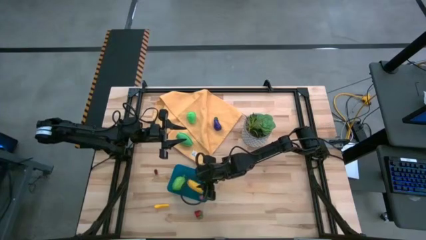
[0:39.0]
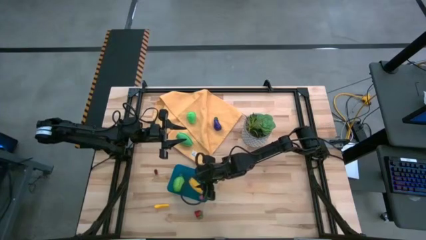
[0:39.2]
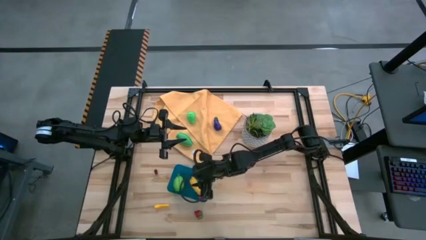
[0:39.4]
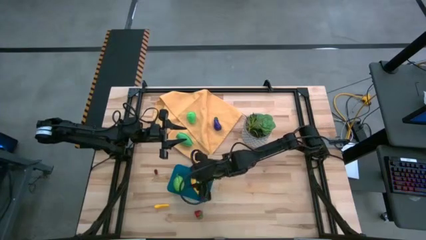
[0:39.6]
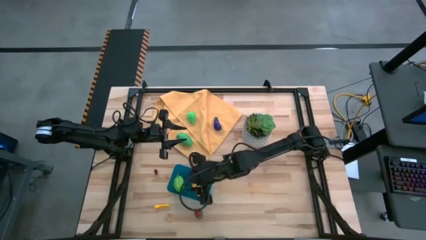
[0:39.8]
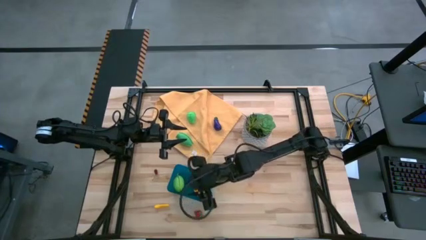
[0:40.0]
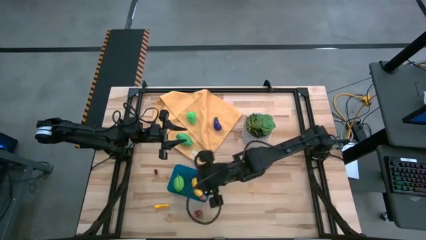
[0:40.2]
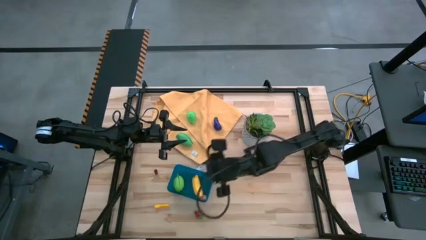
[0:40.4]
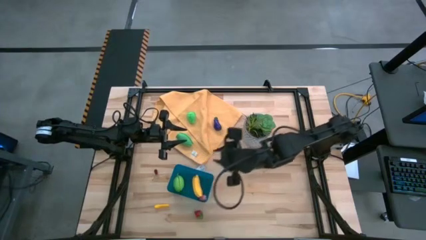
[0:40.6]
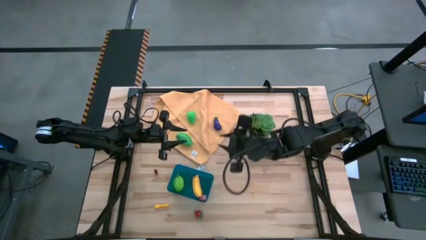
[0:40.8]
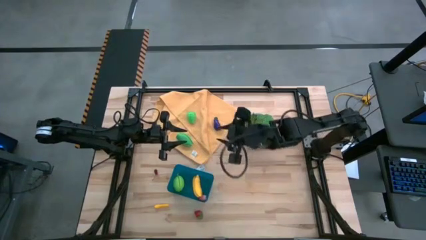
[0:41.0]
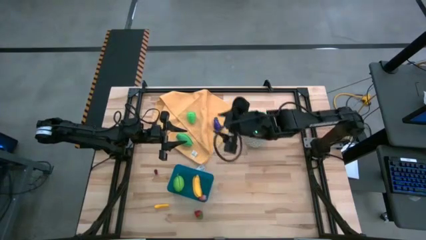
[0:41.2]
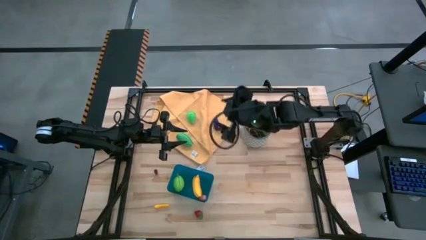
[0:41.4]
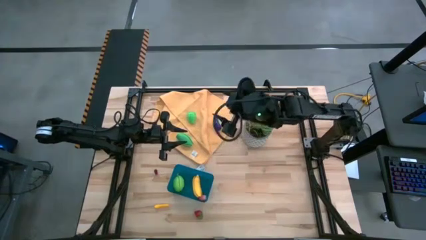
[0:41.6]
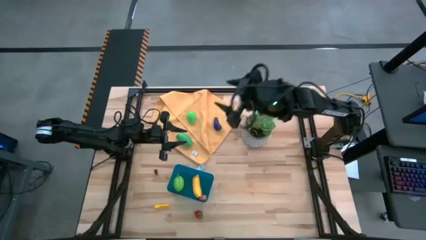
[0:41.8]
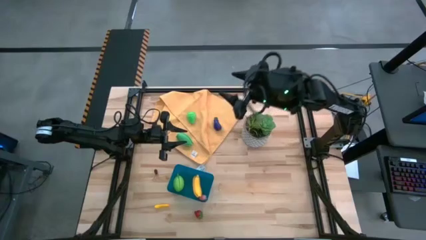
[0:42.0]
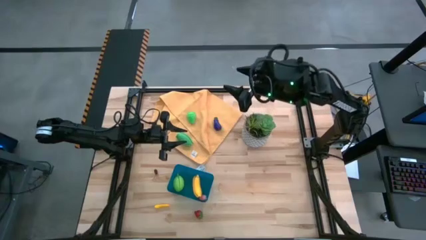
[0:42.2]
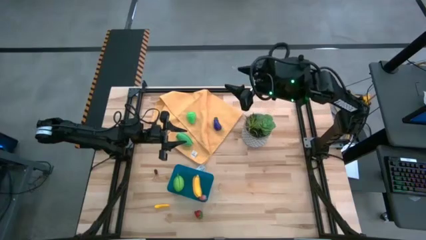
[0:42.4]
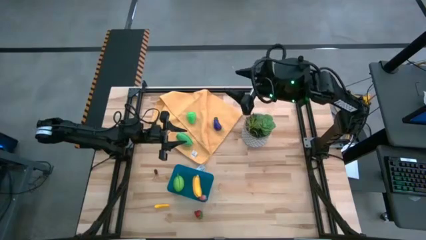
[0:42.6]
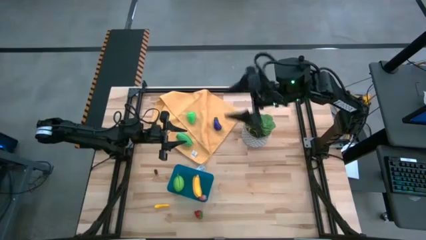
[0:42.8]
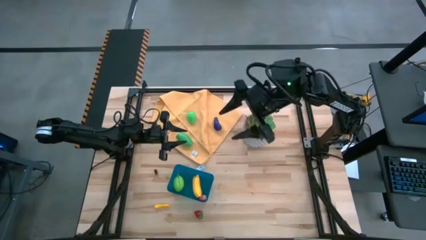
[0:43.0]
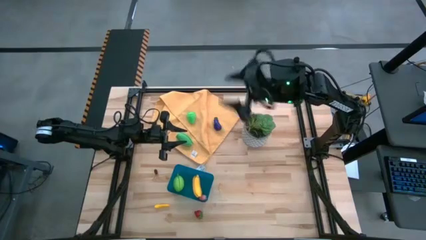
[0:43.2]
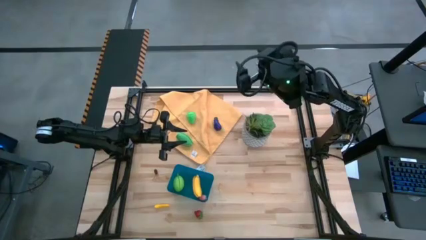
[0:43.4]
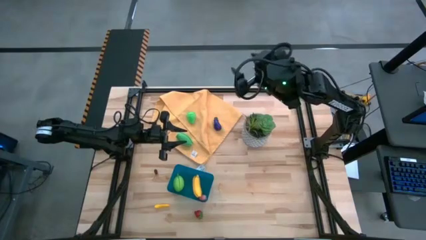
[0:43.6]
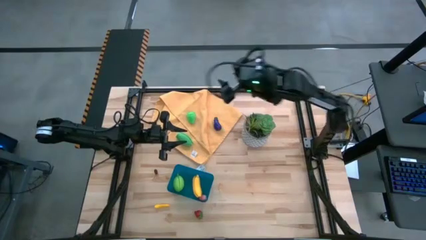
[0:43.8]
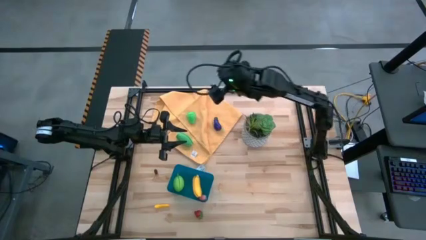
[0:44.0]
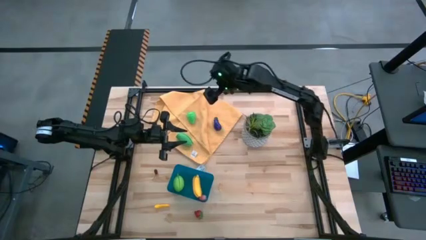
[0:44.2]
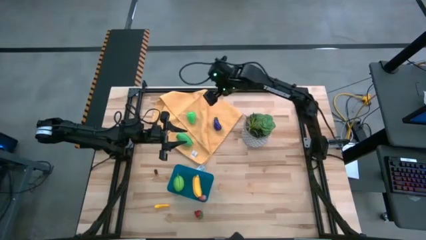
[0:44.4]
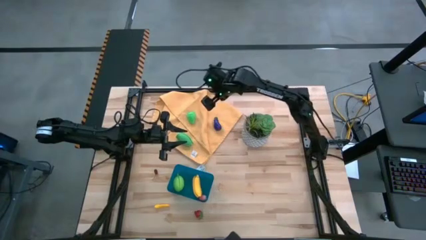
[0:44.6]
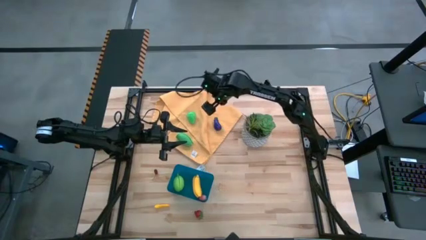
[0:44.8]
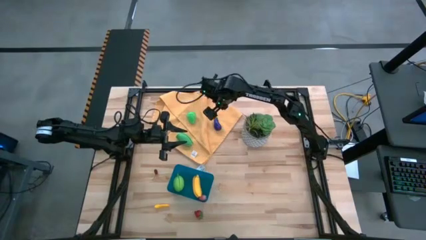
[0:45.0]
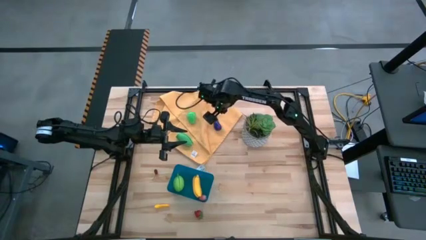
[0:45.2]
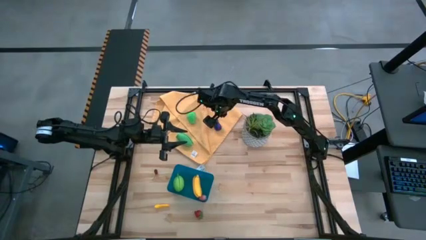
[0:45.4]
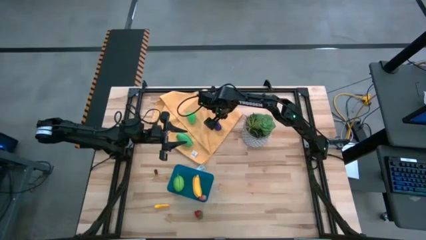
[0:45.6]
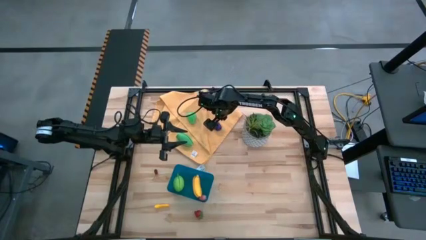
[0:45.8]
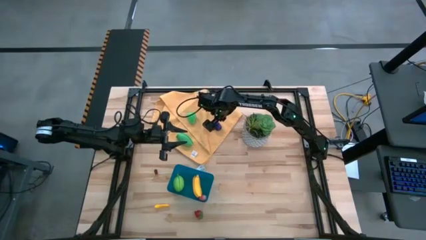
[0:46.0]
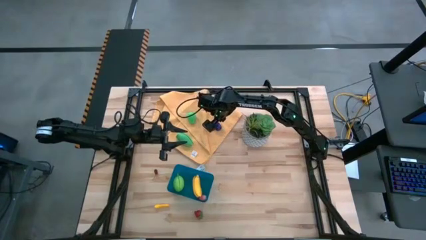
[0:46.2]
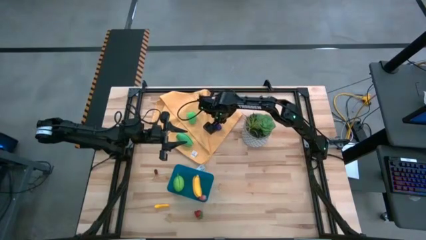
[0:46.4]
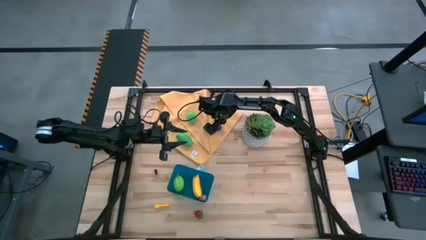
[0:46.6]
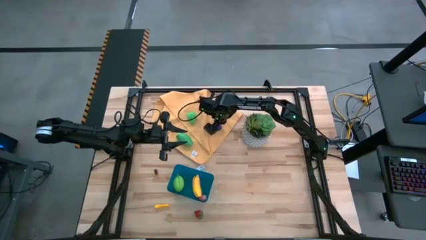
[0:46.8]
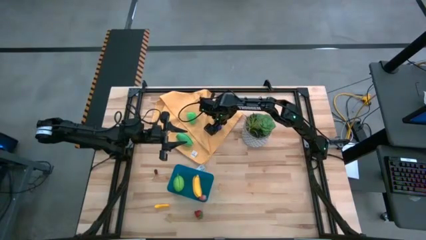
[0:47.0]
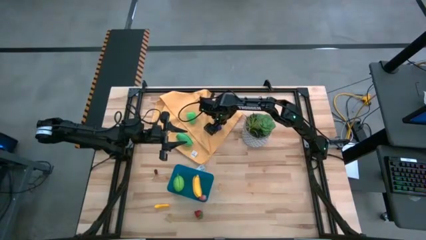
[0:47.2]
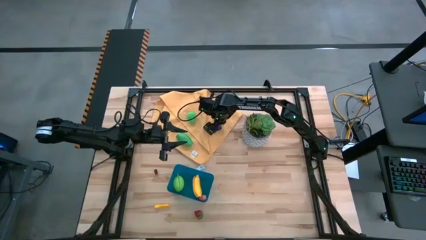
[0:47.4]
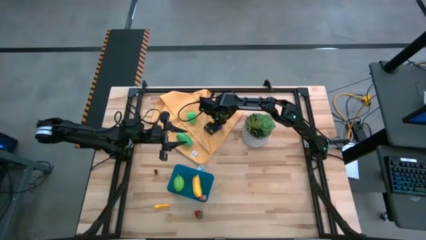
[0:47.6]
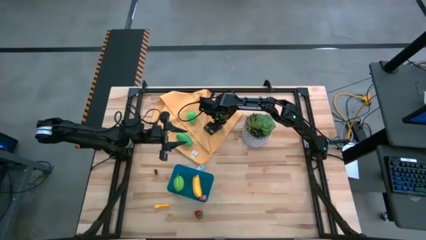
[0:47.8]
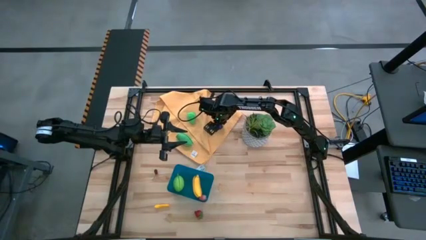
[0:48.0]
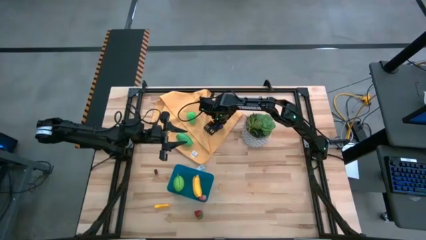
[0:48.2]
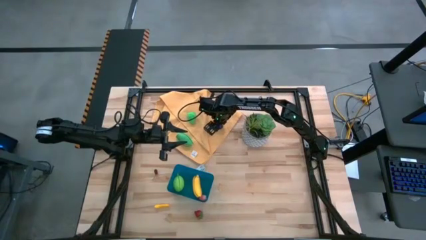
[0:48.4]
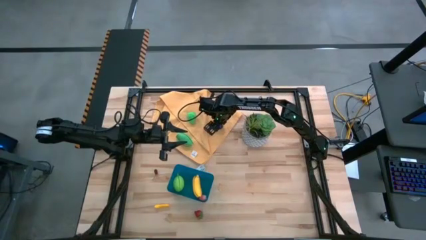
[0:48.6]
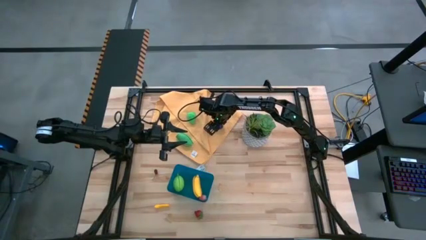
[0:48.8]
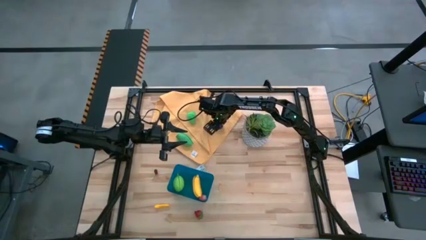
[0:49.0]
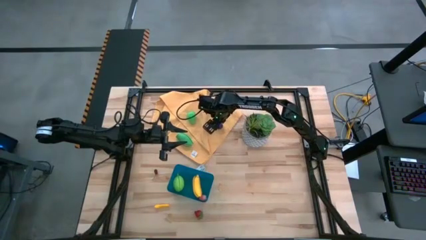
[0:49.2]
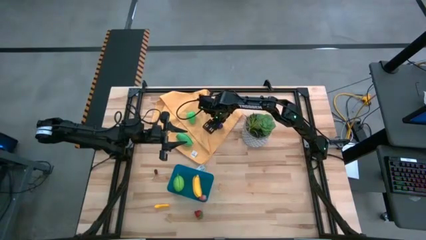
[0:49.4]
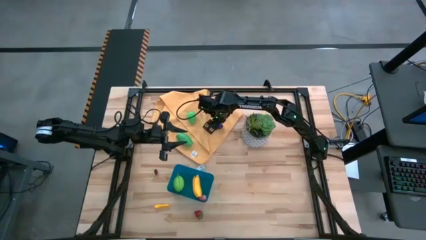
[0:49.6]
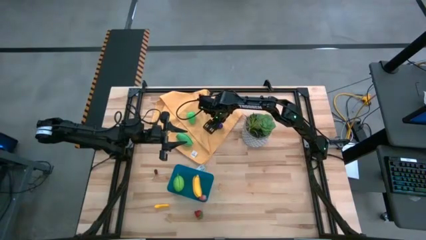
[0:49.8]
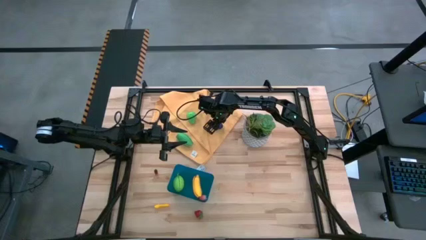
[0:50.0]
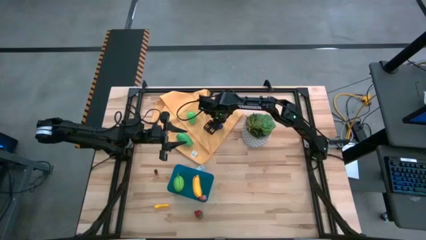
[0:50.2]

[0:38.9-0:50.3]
Task: Pick and placing Produce into tupperware
Put the eggplant into the blue bin

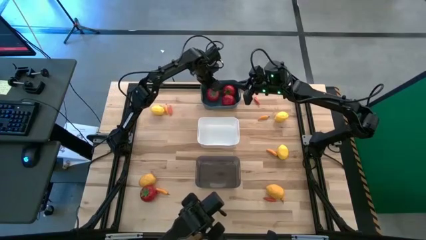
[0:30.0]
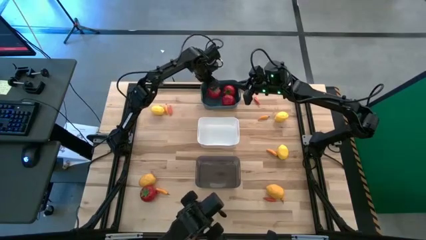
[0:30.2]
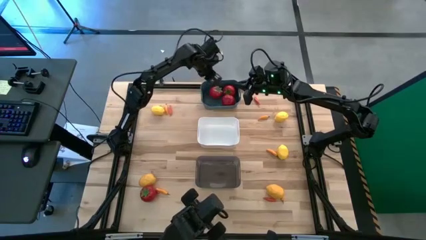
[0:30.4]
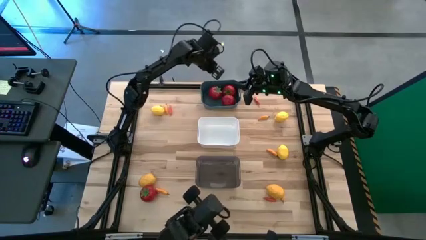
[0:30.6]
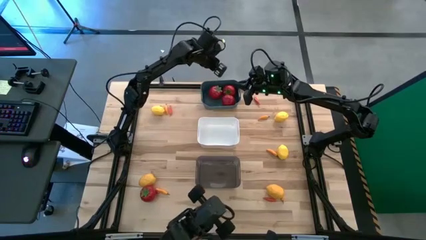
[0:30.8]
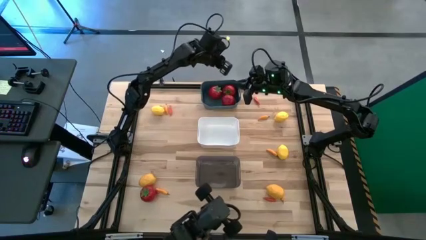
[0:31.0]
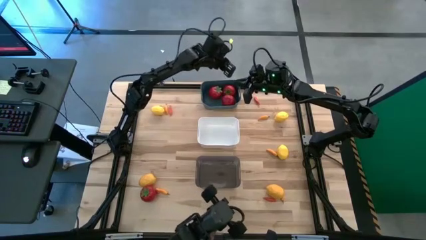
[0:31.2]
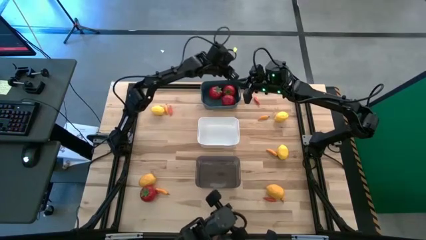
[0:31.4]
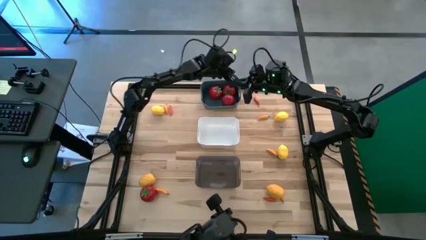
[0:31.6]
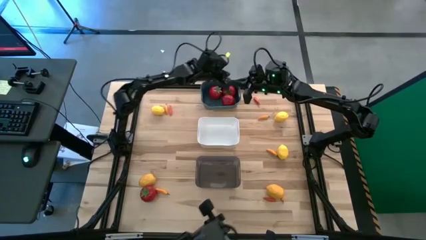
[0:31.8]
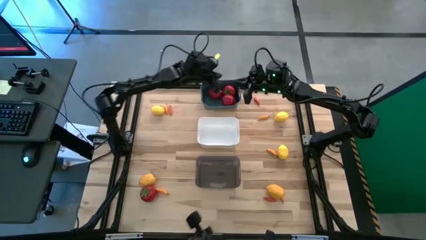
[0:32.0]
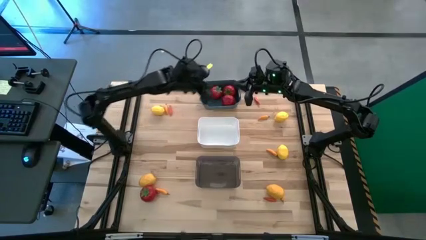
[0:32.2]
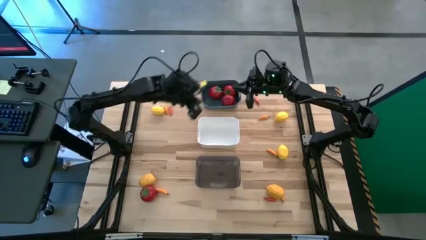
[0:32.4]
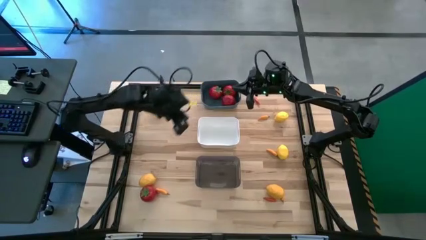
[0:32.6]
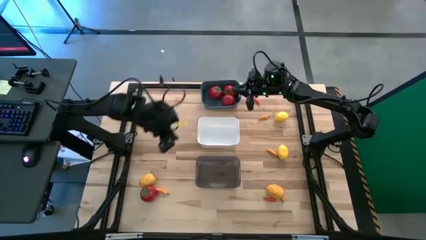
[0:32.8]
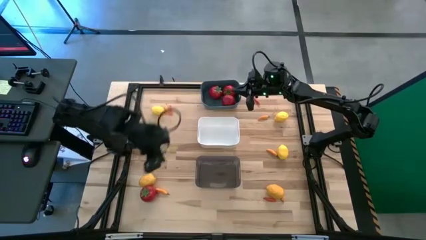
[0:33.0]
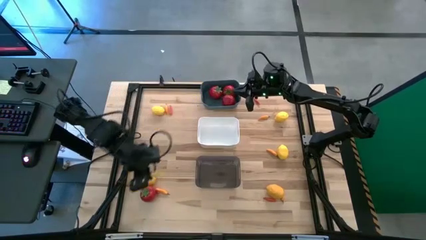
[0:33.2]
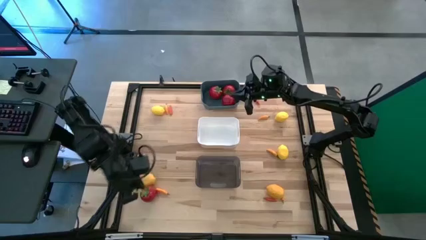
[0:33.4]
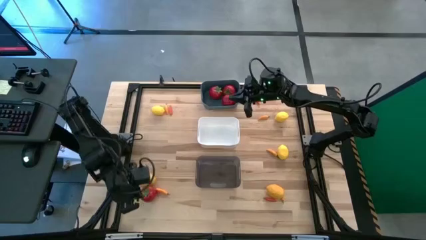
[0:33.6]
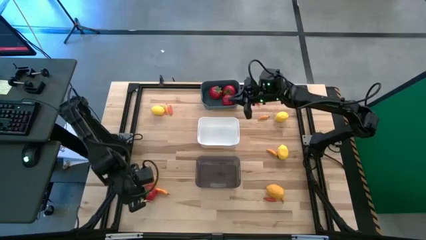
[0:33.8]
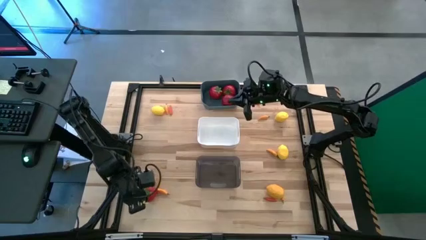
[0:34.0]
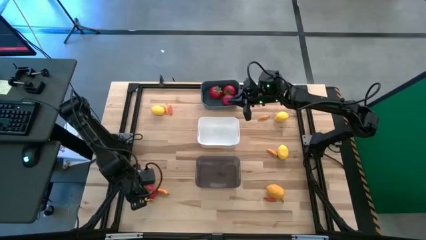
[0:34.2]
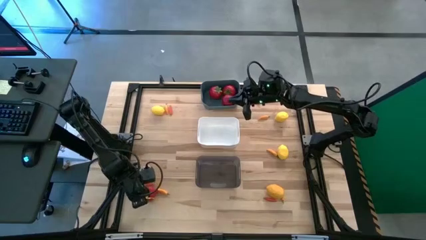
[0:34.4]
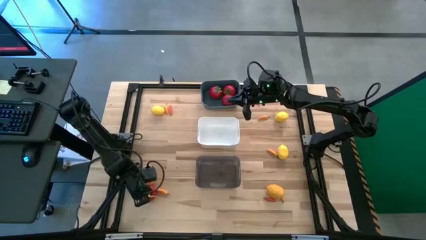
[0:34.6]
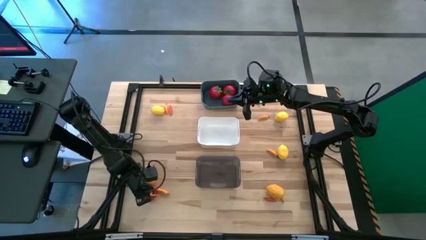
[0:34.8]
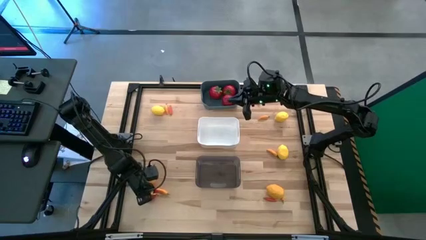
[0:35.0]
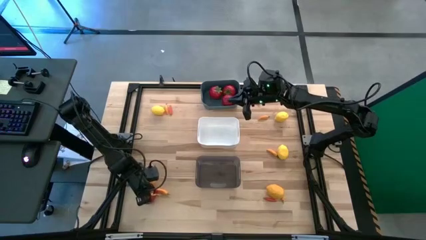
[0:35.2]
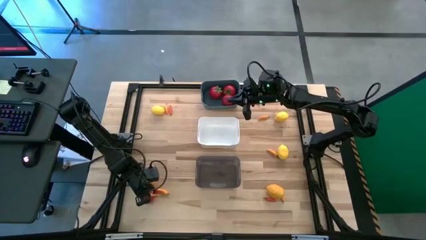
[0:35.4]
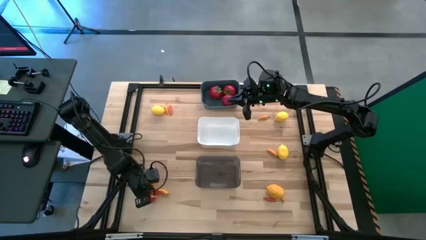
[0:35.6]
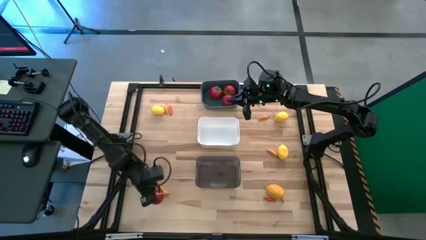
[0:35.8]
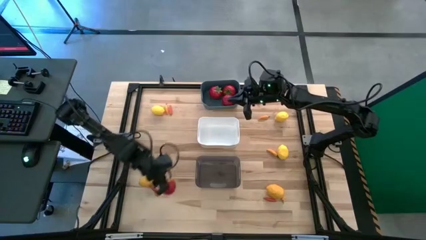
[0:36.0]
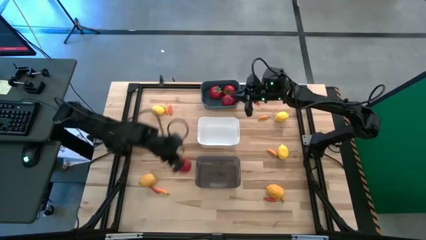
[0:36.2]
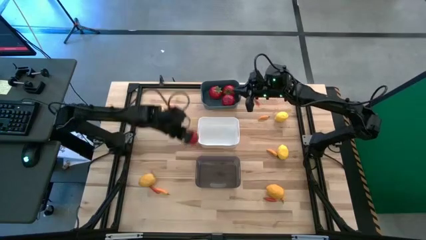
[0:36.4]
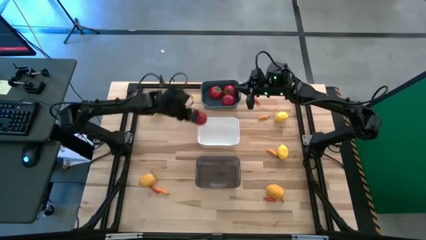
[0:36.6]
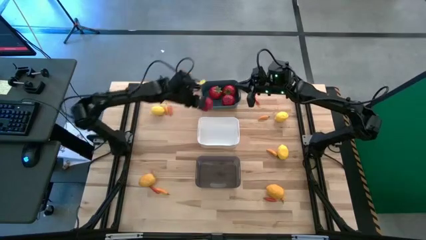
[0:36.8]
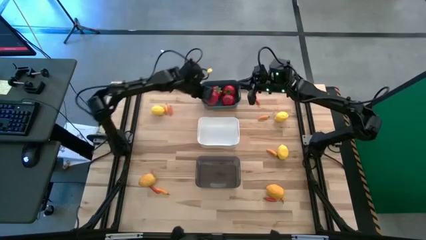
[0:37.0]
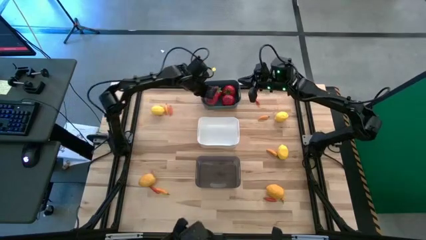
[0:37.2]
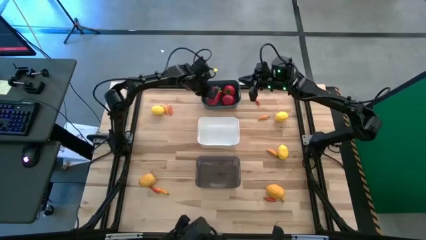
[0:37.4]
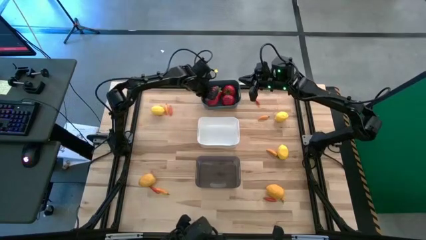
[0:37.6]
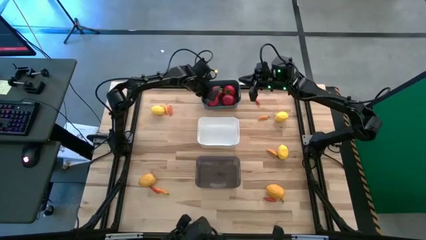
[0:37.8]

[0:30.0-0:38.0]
Task: Sort produce into baskets
Put the red tomato into the blue bin
